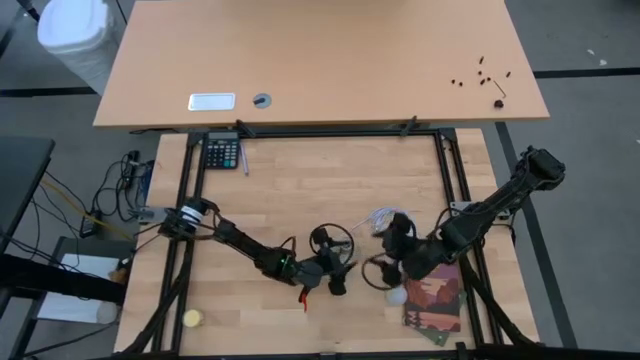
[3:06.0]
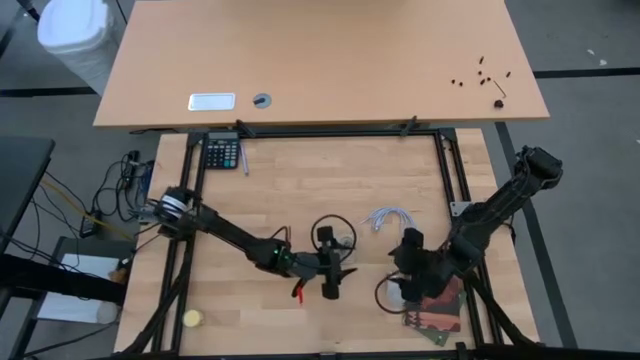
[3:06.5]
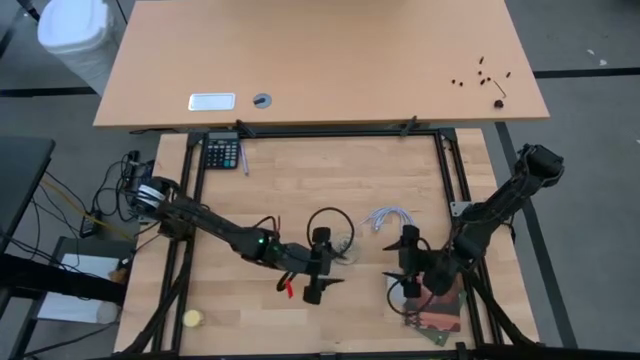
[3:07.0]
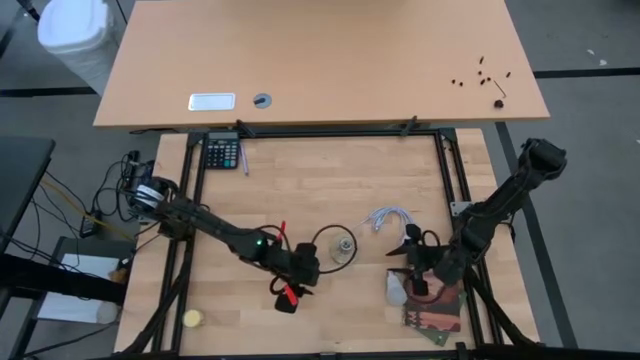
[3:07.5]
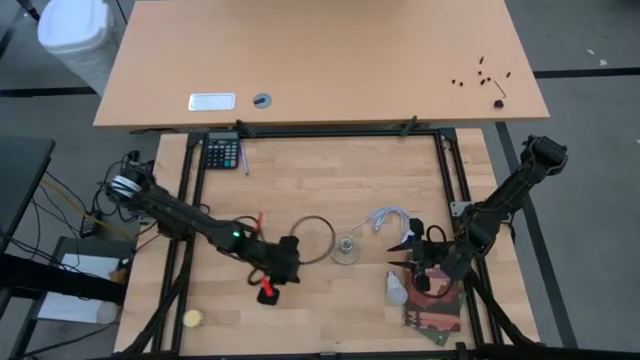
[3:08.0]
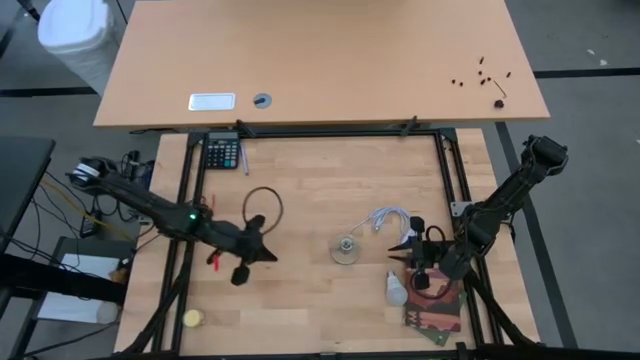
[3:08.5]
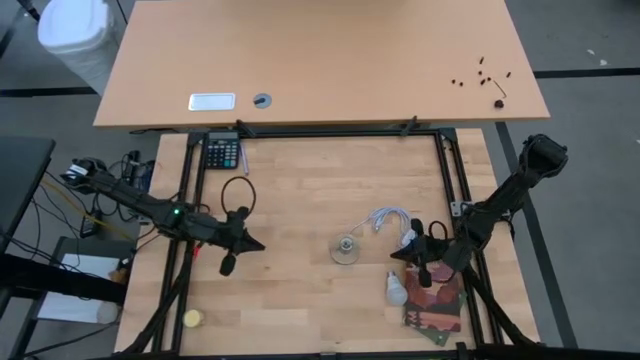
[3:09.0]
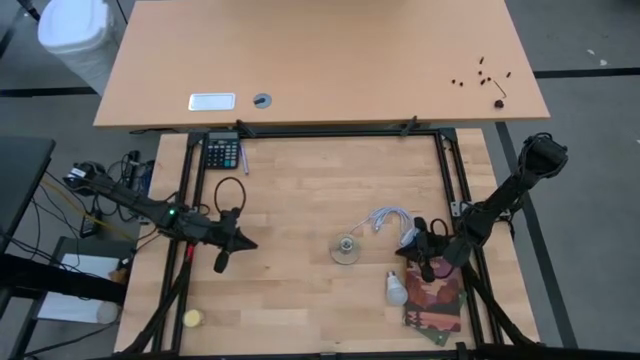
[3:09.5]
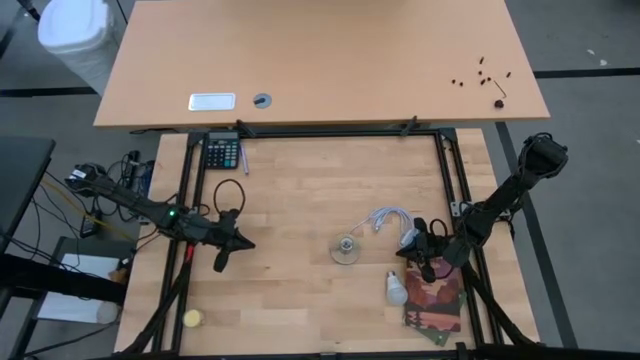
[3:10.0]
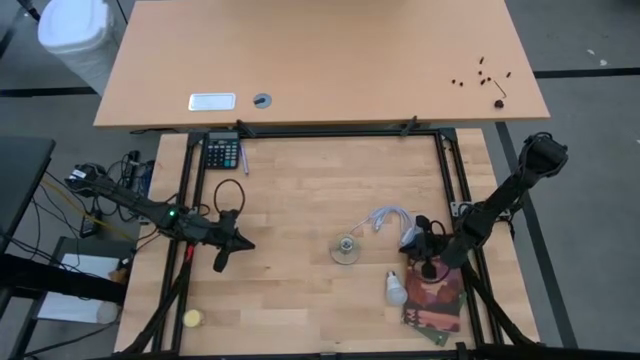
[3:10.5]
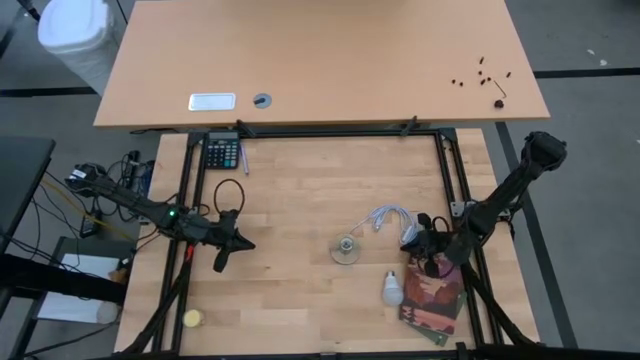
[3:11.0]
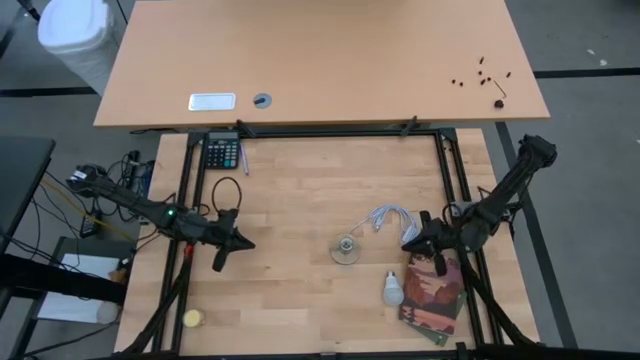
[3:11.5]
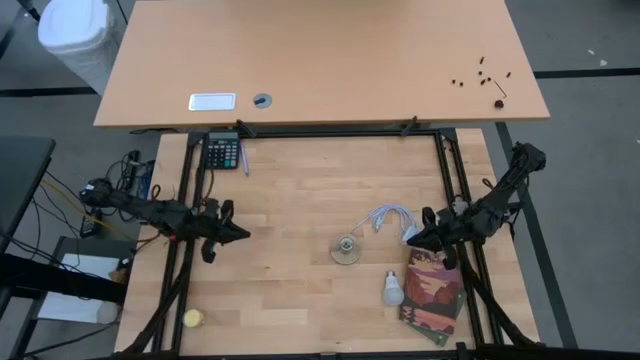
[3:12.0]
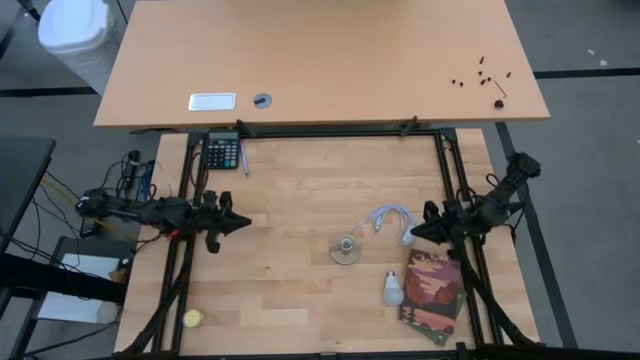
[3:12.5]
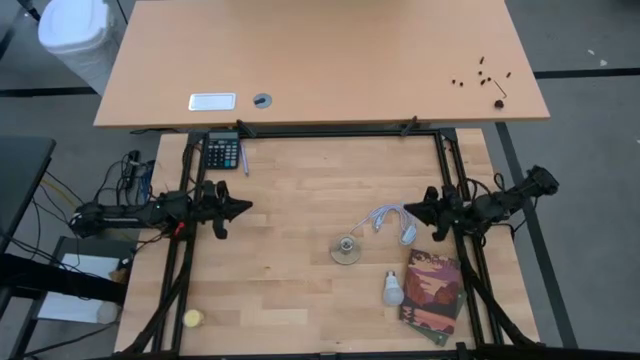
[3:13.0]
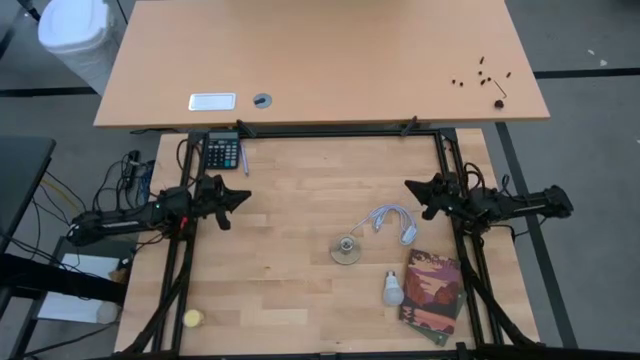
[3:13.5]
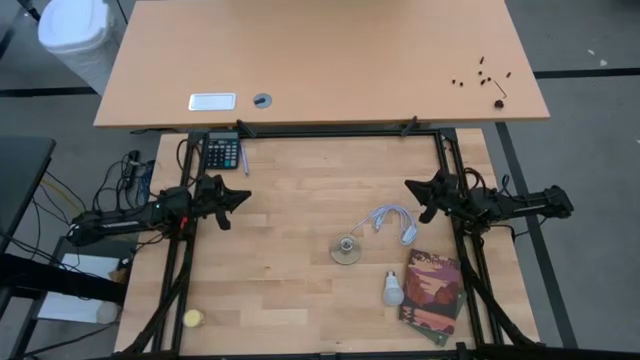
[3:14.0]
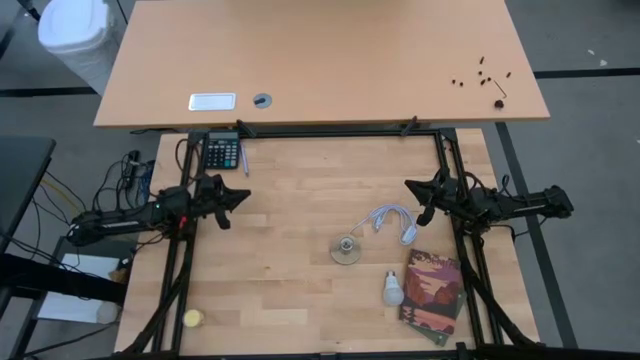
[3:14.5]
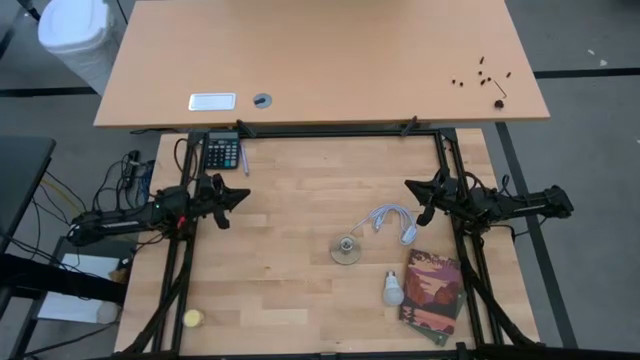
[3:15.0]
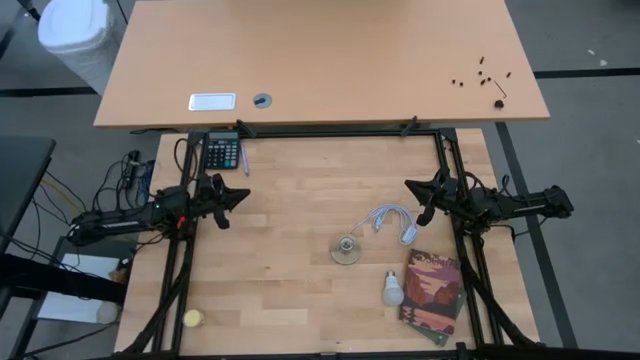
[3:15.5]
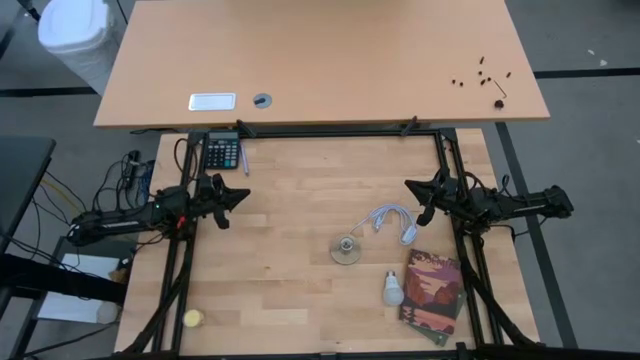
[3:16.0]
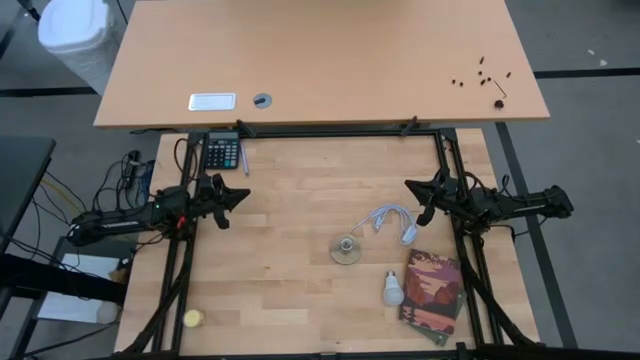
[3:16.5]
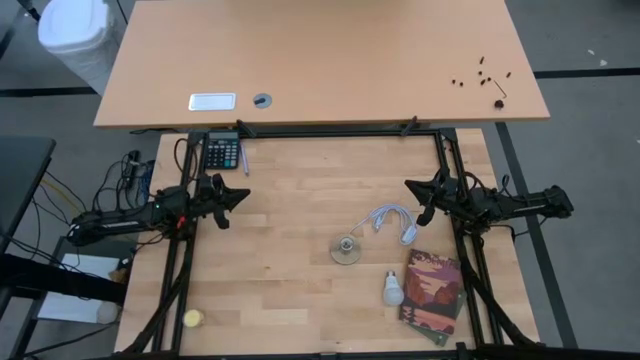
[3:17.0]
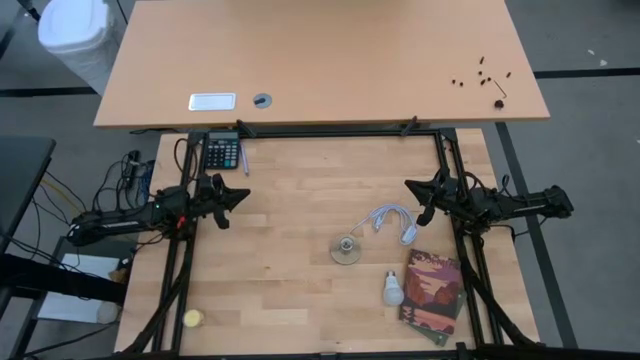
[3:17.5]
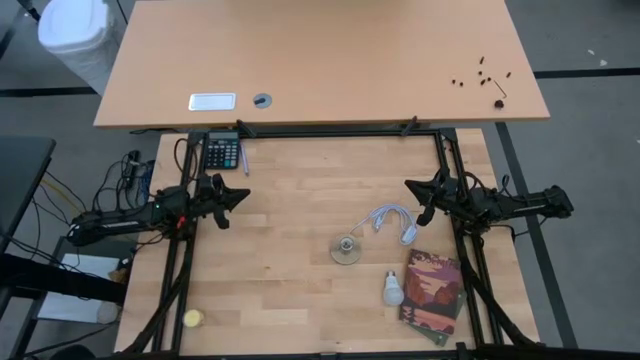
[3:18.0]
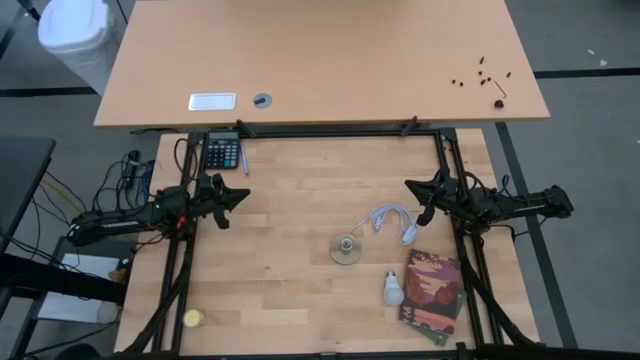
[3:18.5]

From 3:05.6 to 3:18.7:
Task: Screw lightbulb
Return to Home Position

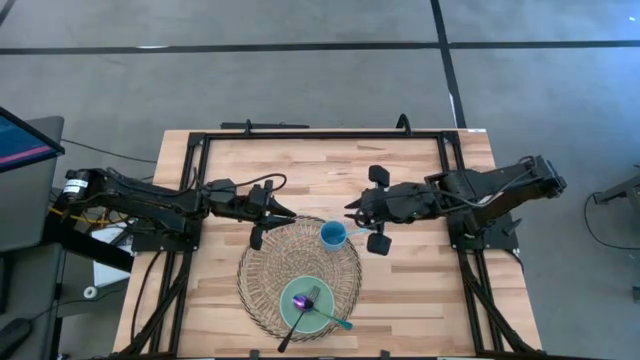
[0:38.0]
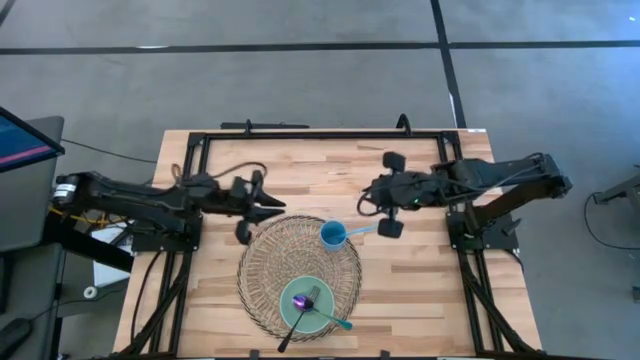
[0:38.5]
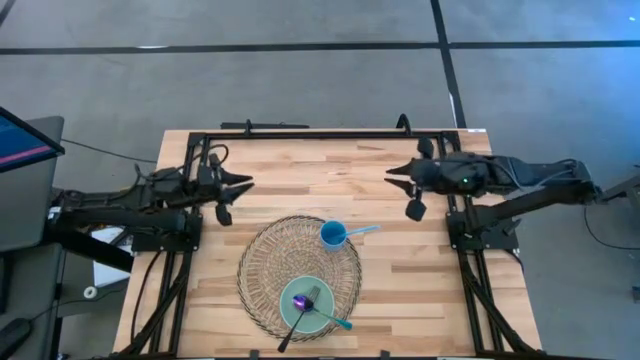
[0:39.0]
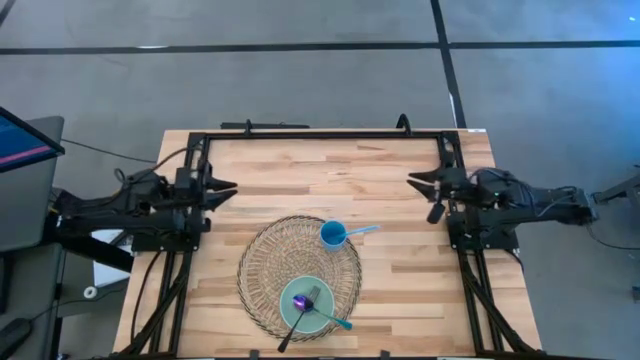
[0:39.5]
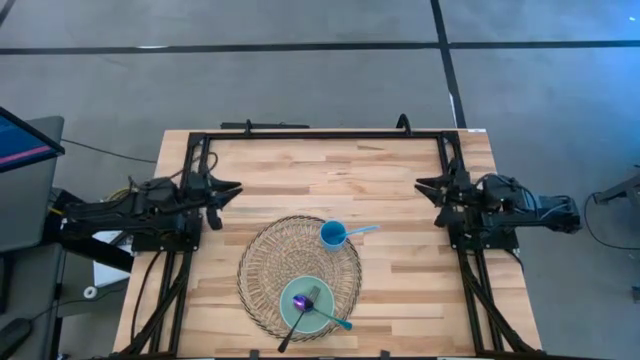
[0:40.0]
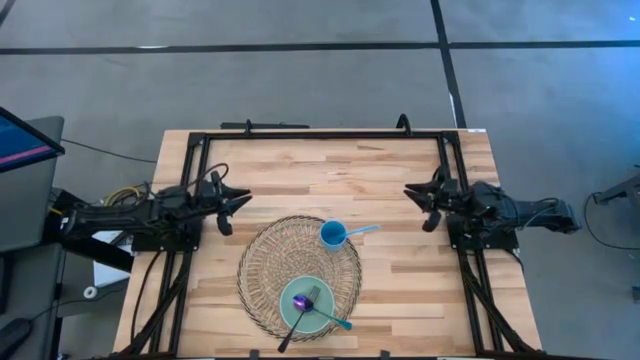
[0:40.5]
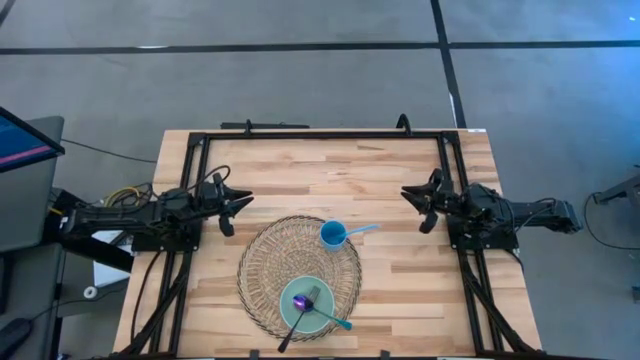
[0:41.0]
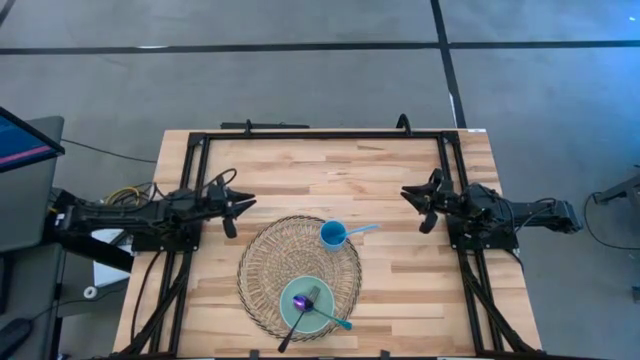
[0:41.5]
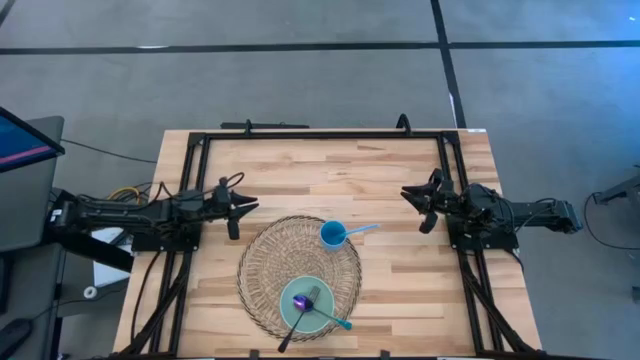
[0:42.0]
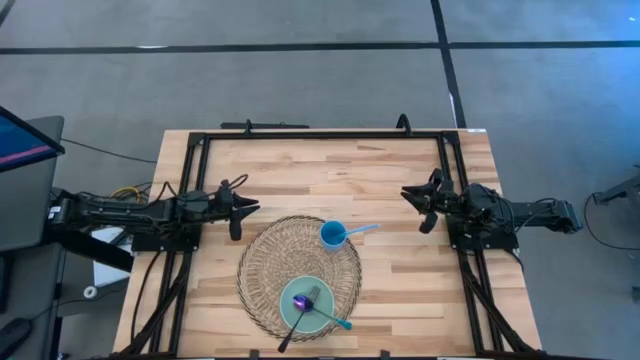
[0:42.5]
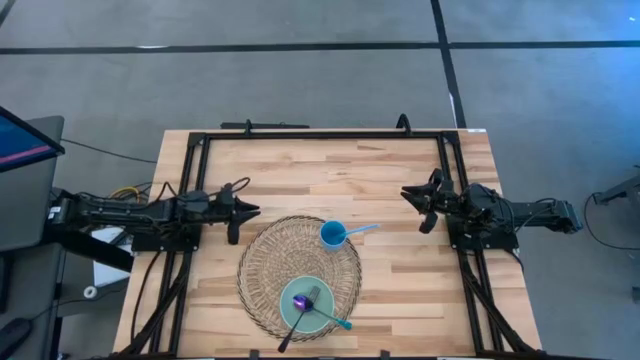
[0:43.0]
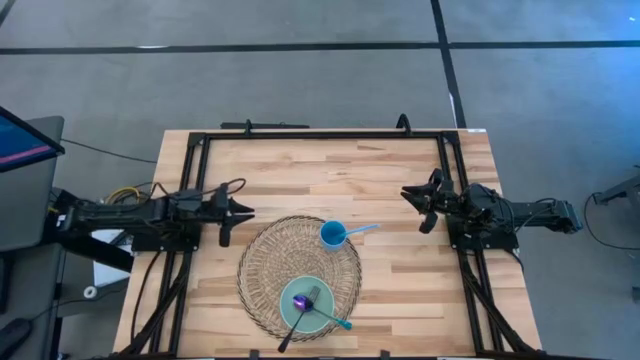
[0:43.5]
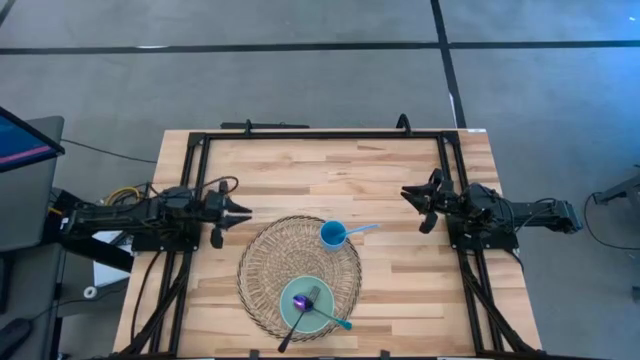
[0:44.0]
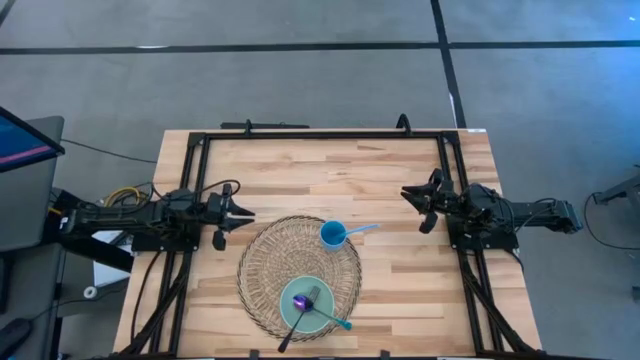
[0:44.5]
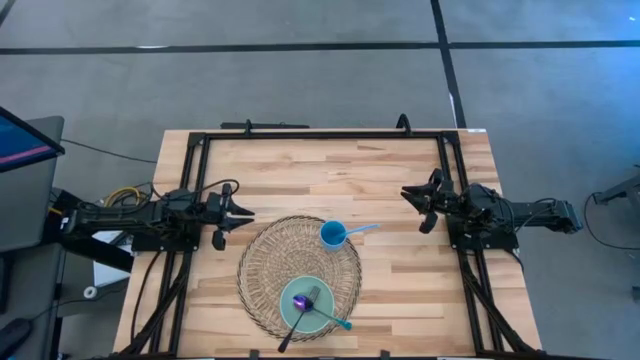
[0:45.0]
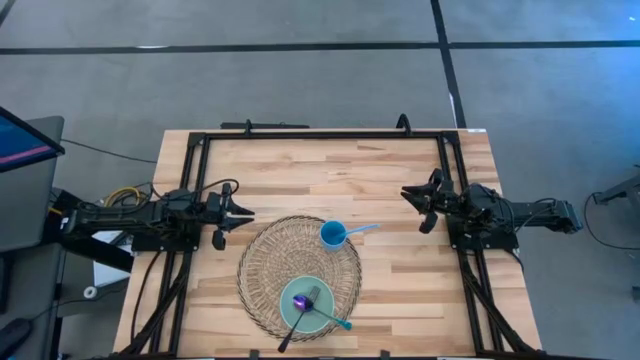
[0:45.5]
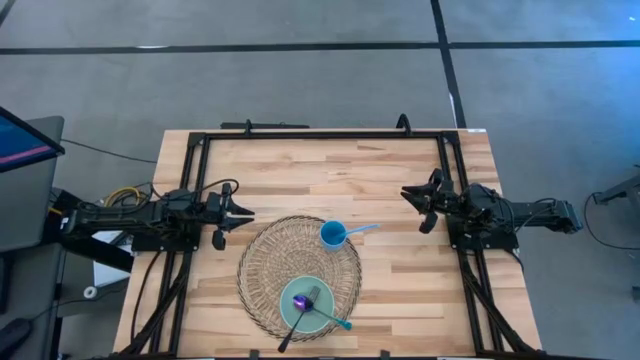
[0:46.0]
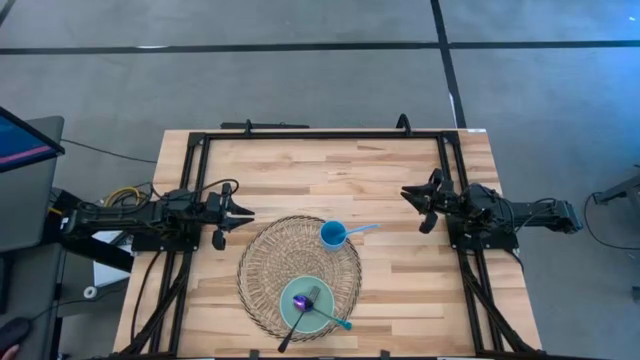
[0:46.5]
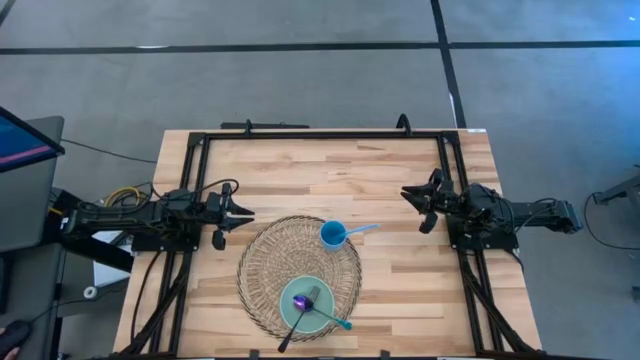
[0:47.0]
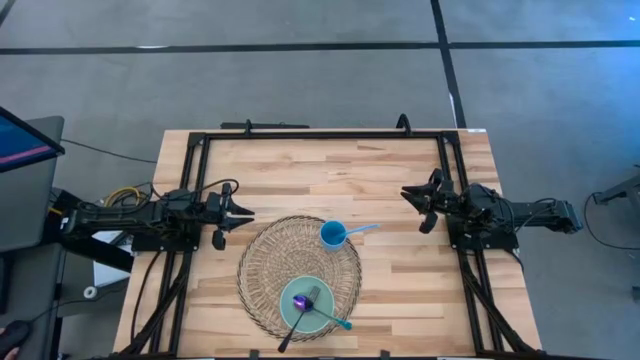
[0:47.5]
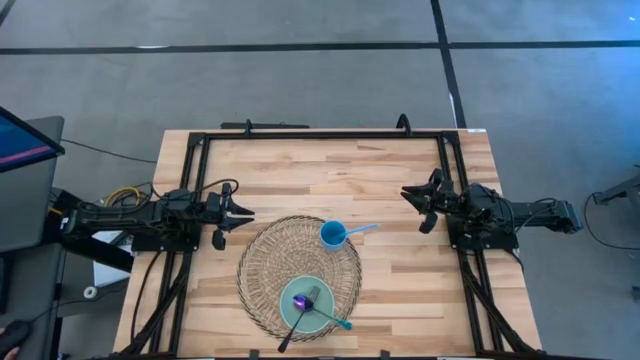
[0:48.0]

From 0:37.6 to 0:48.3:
Task: Pick & Place Utensil
Return to Home Position
